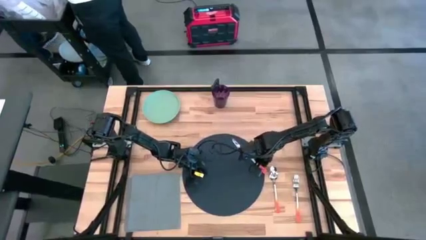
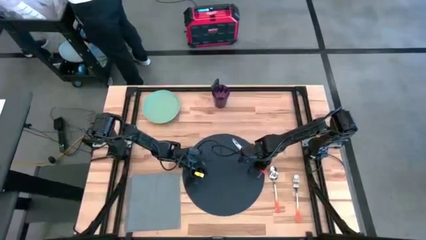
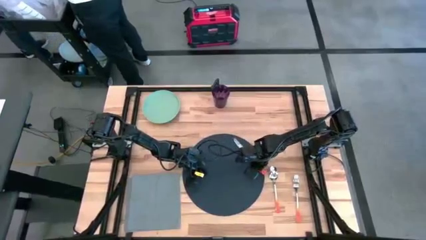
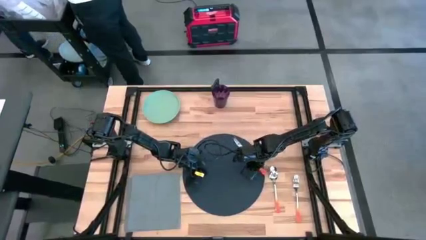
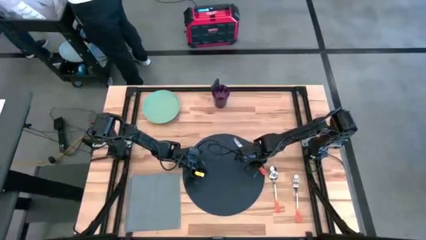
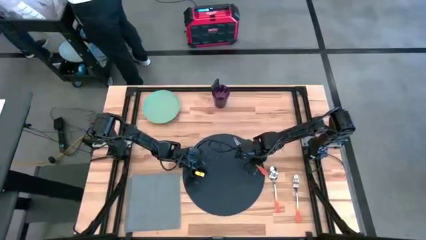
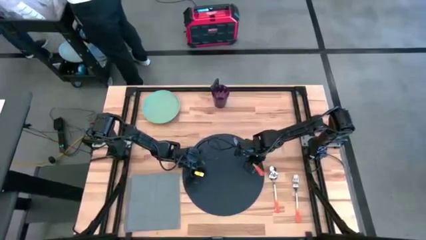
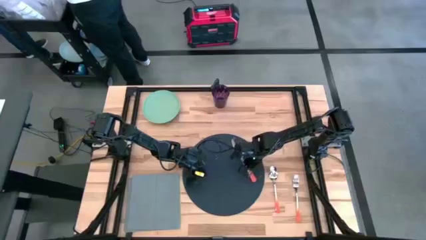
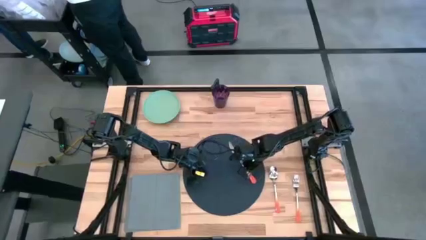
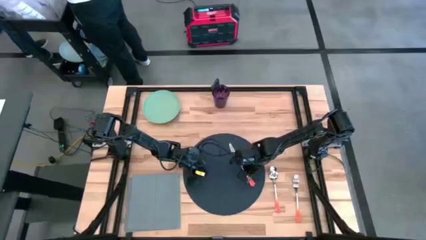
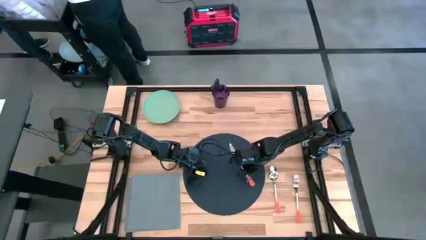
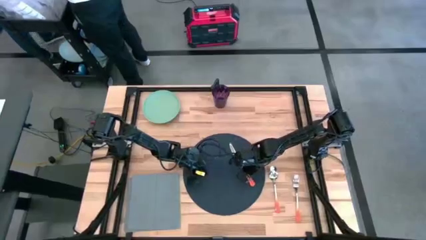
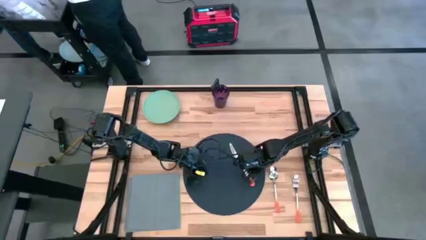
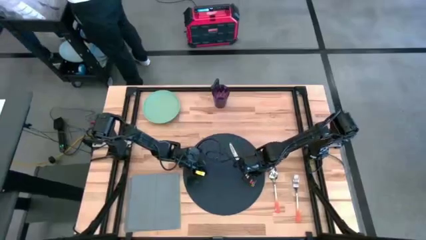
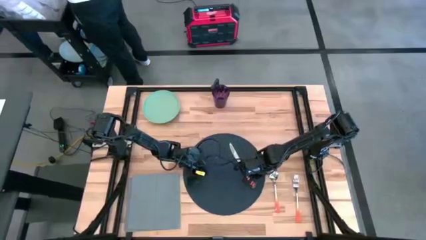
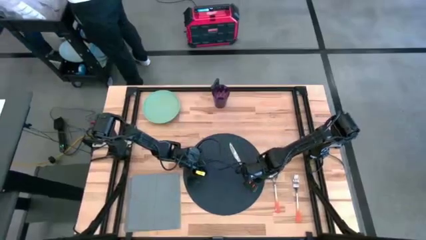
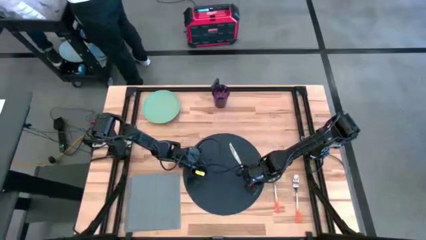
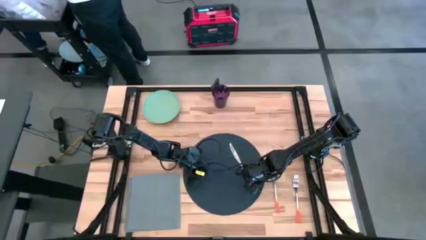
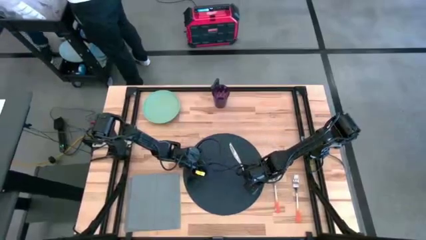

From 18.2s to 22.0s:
Task: Set table place
Move the table knife to the table mat

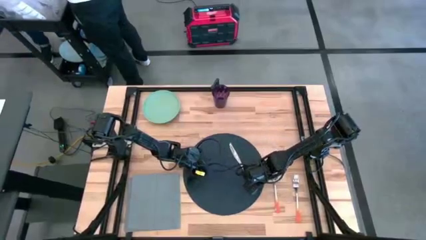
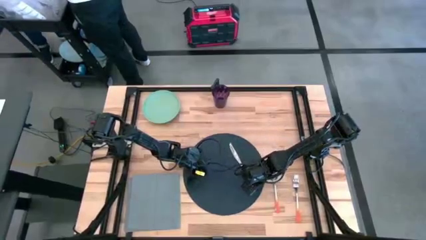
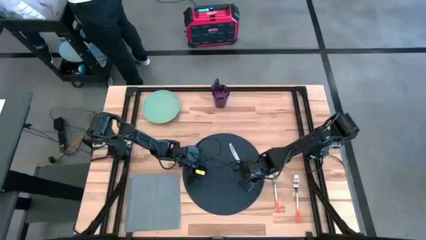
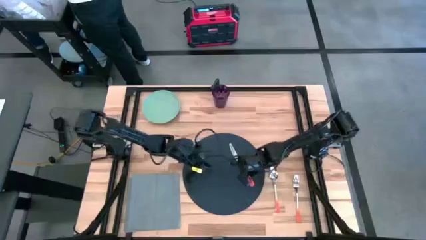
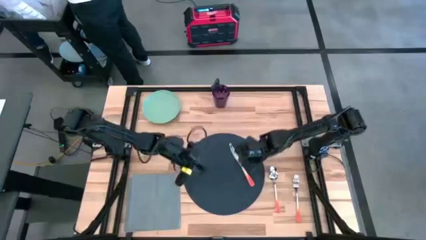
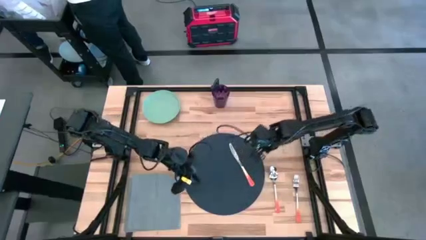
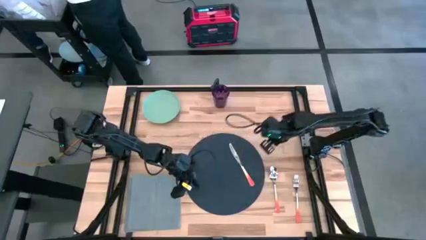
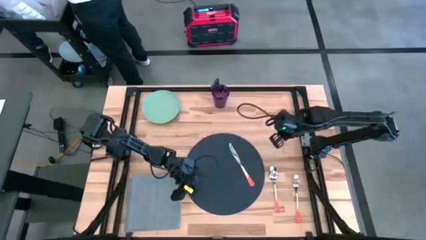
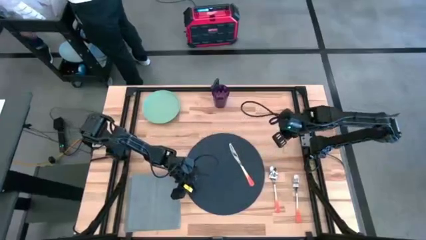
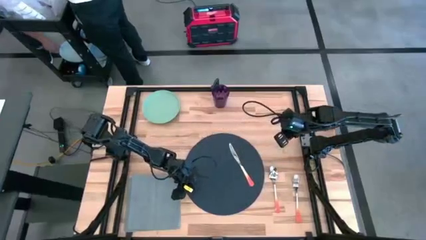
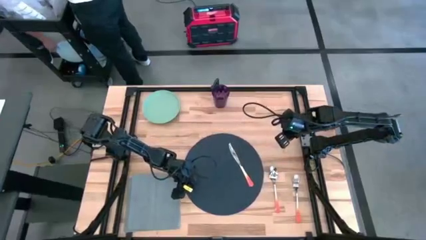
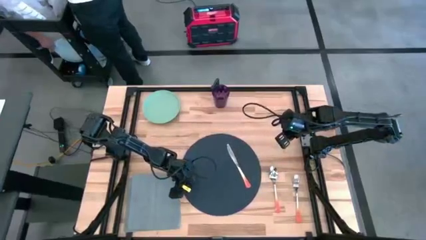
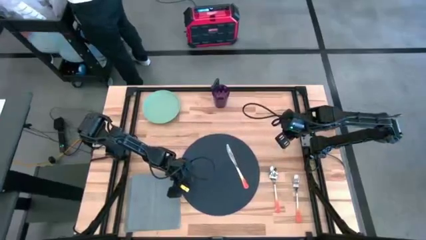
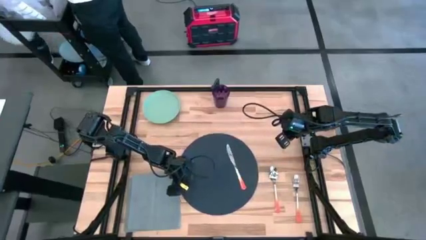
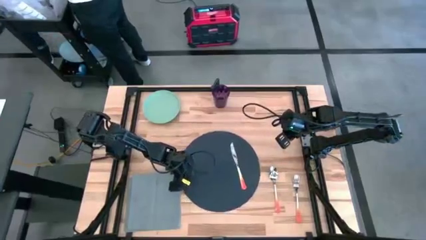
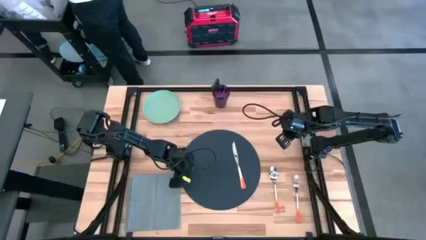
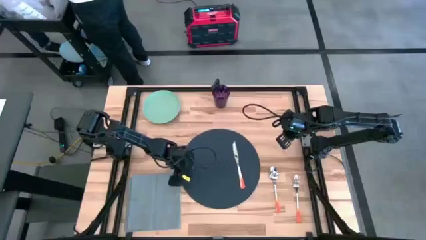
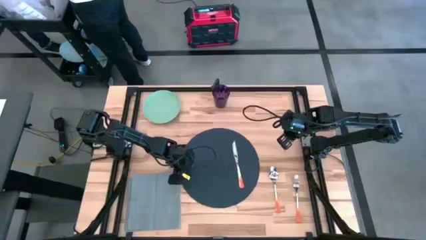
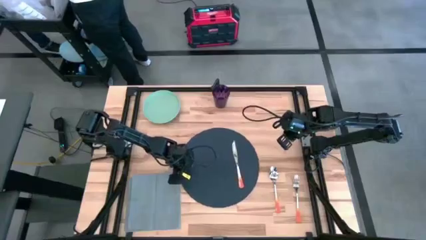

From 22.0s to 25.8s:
Adjust the table mat to the center table

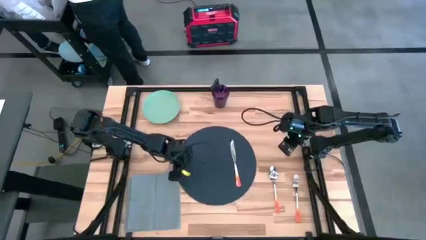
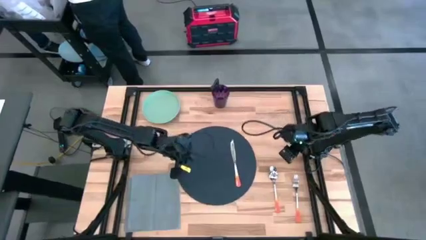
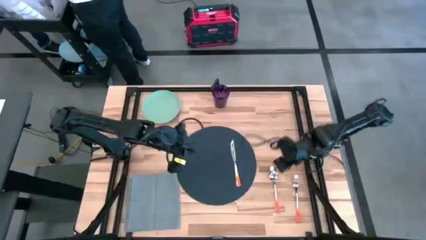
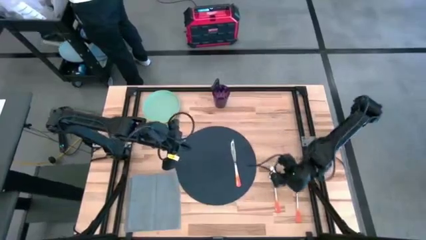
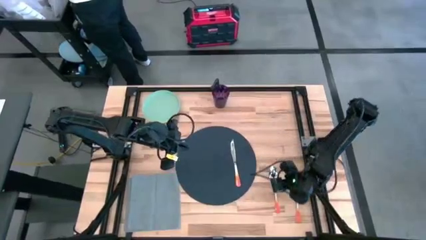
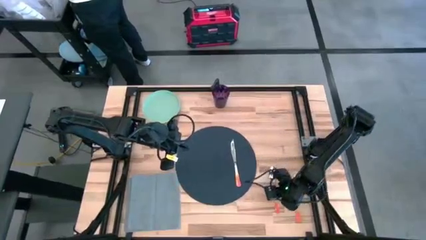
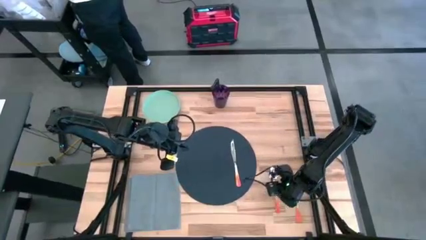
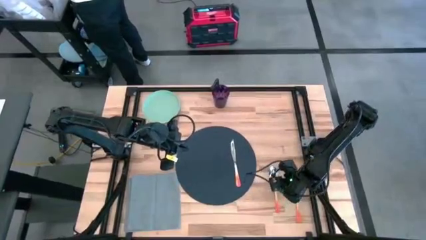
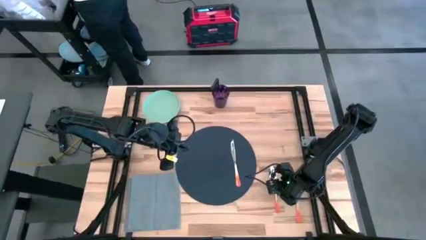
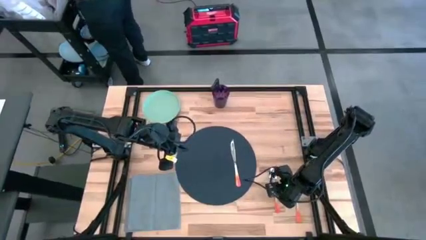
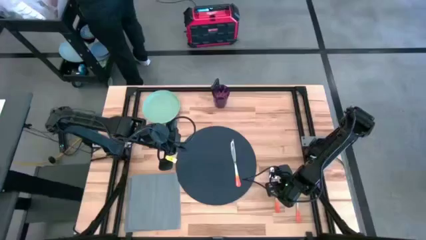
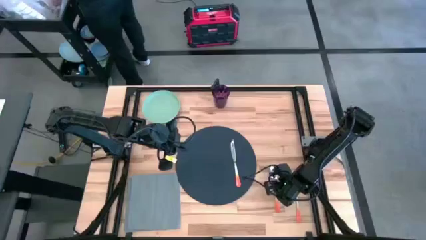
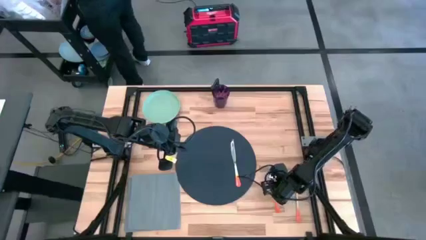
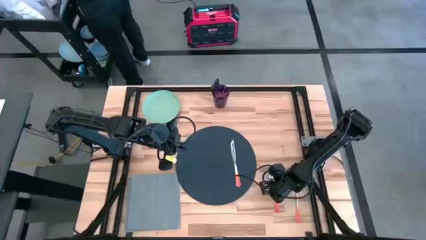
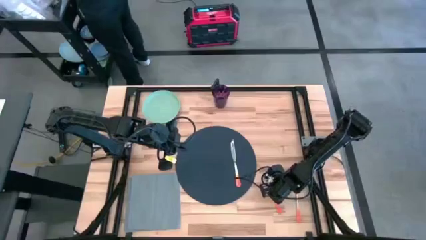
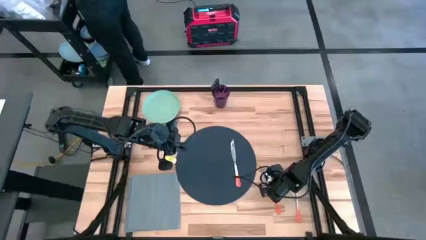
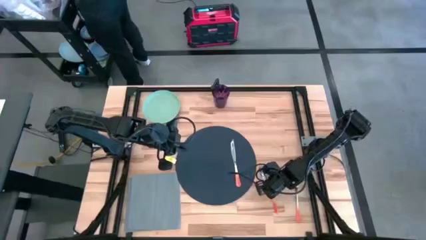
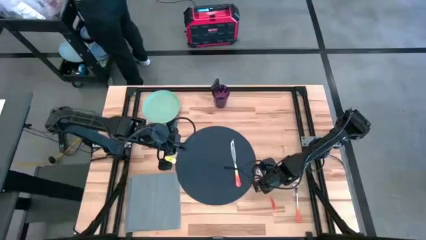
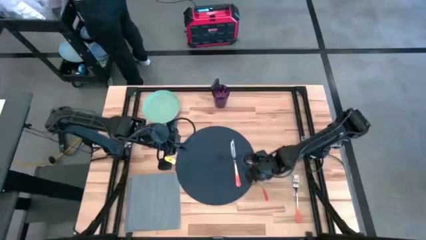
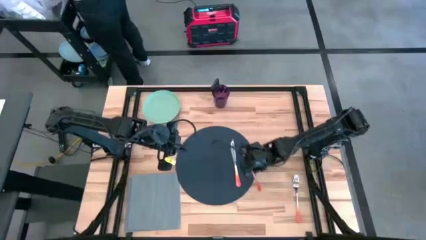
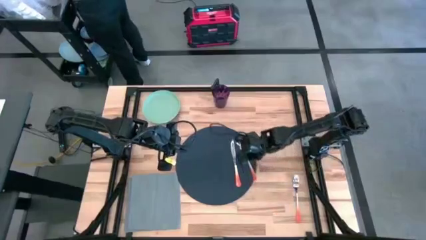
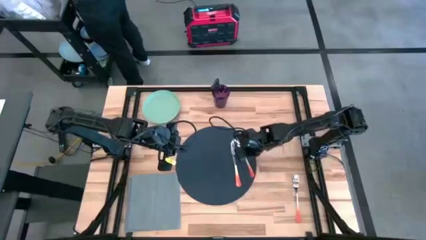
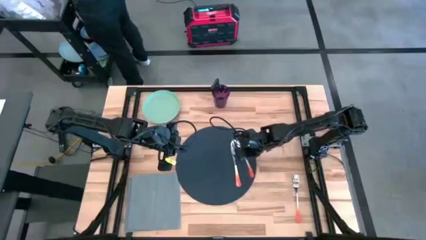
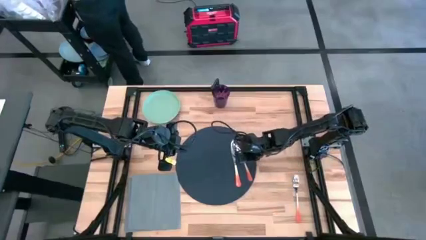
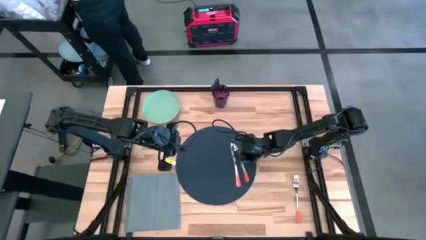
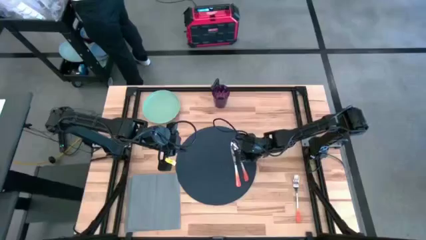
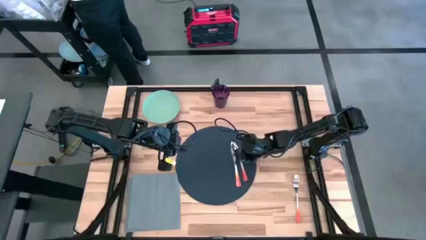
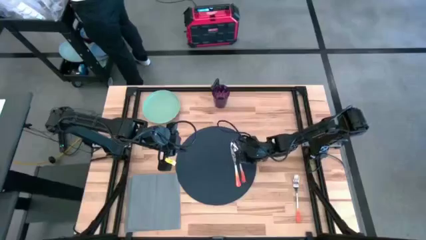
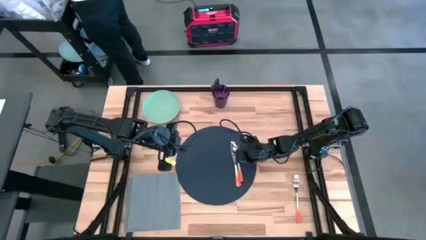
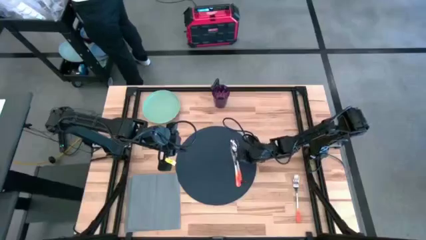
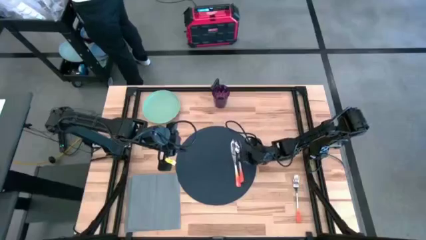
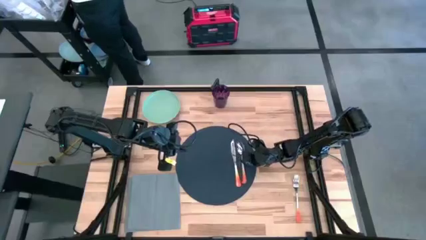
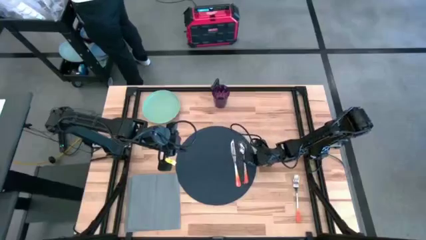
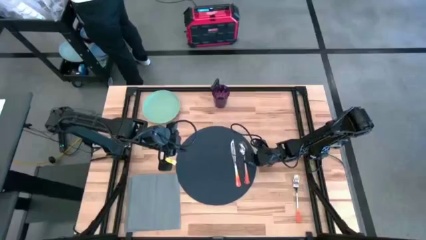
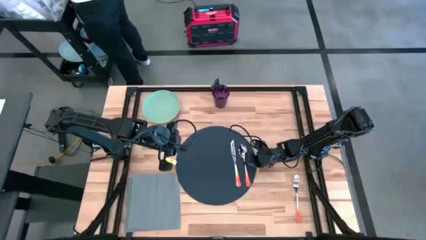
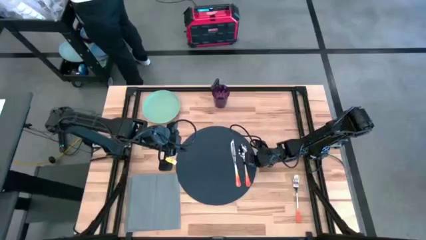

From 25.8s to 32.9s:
Put the orange spoon next to the table knife on the table mat

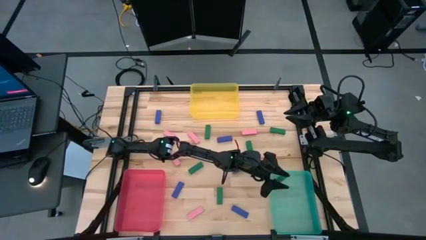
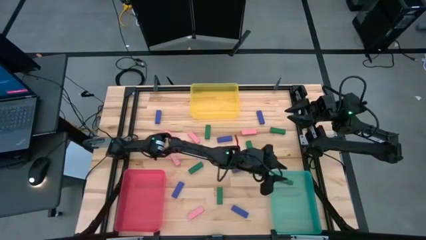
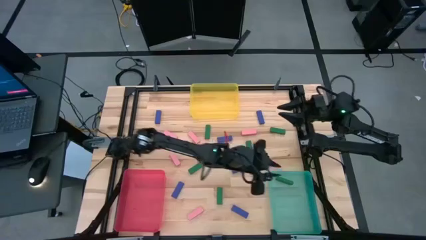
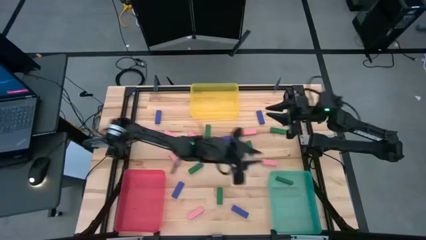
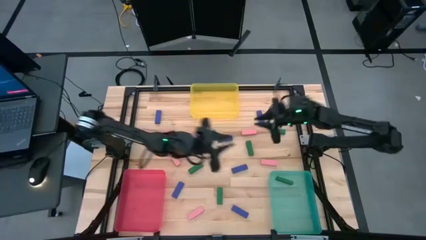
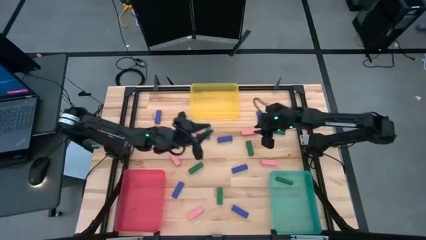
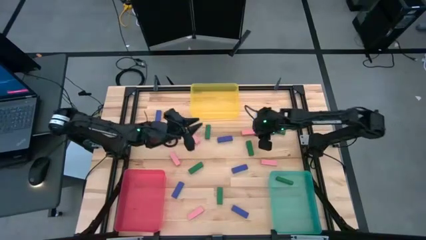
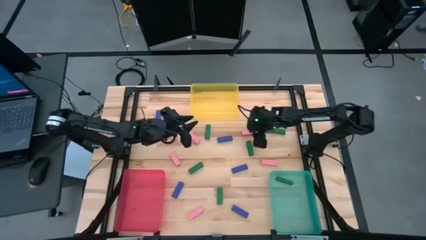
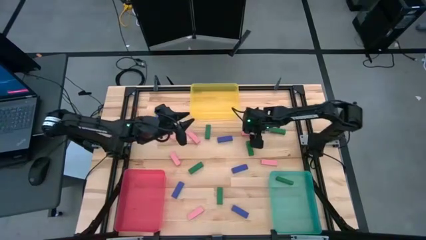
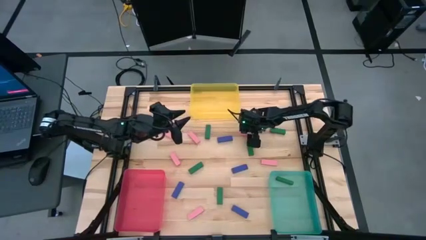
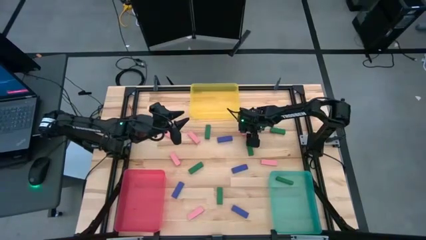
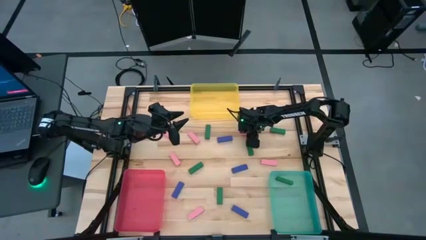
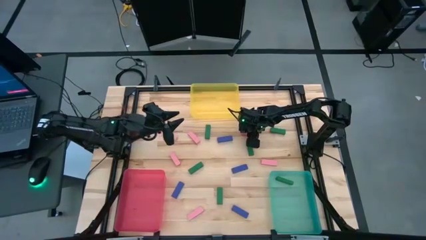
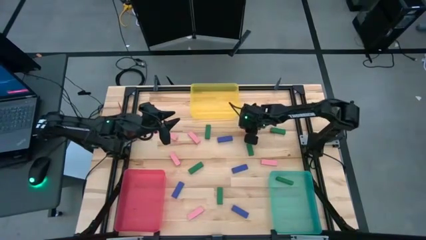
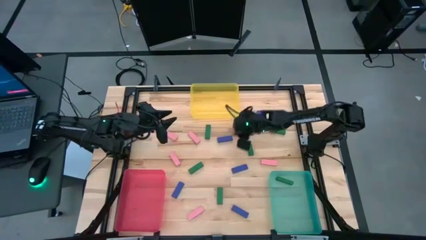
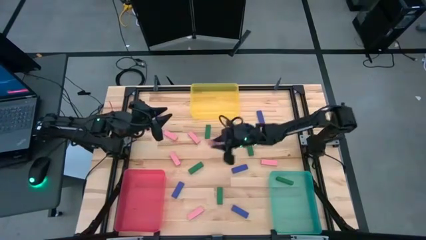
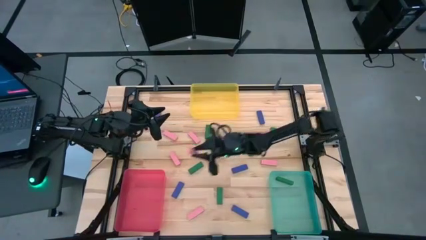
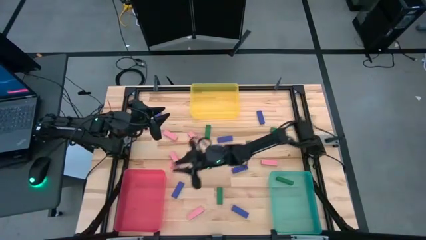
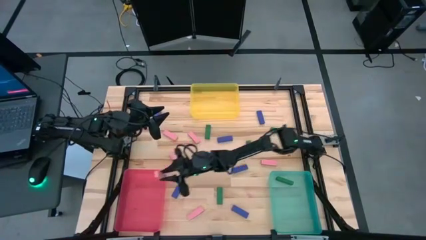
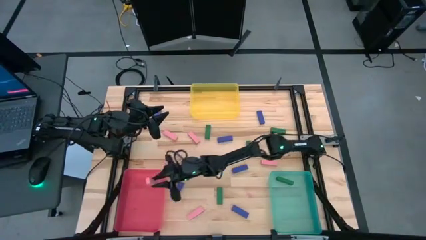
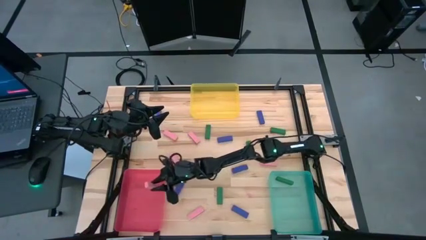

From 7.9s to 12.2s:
Task: Sort blocks
Put the pink block into the red bin
